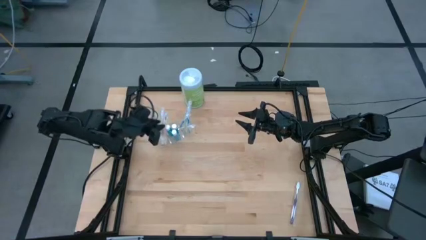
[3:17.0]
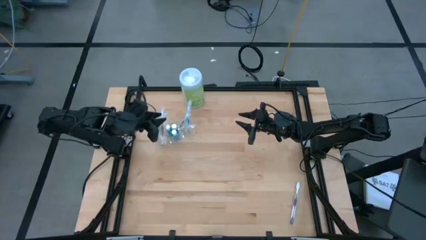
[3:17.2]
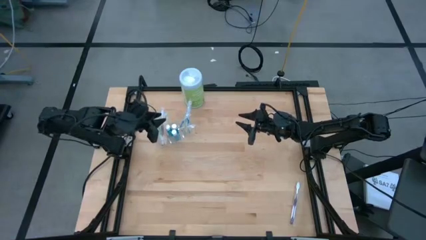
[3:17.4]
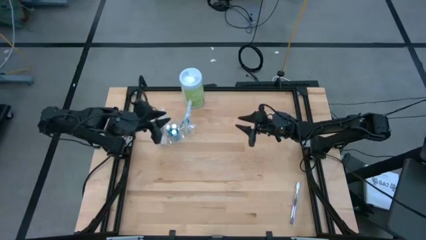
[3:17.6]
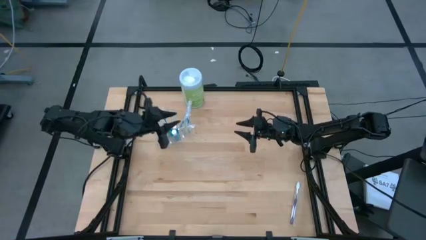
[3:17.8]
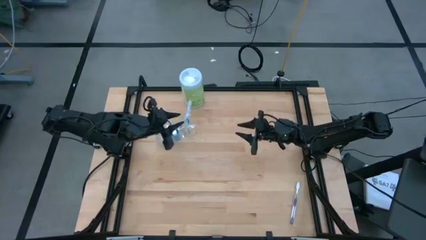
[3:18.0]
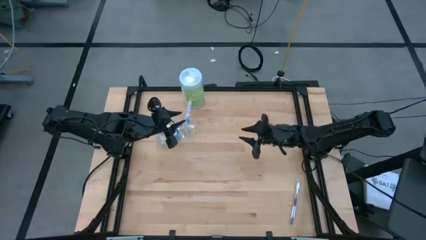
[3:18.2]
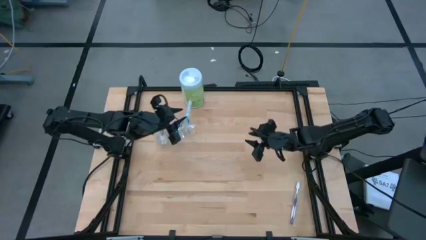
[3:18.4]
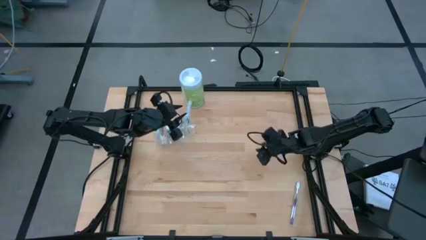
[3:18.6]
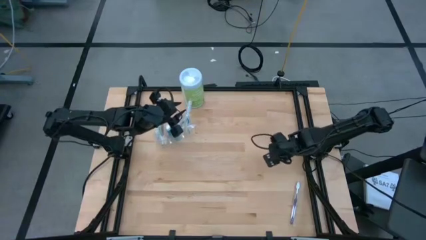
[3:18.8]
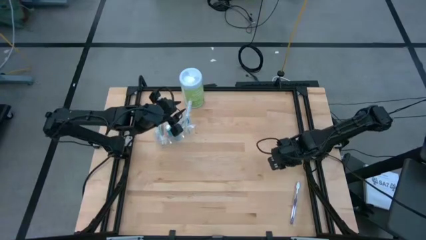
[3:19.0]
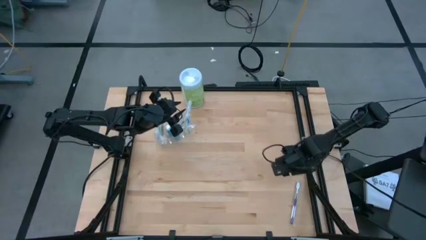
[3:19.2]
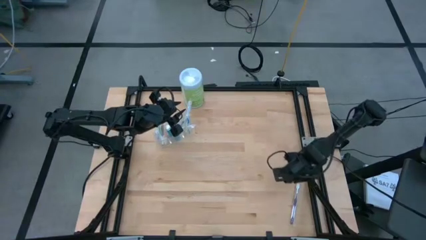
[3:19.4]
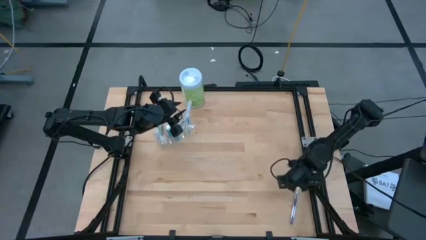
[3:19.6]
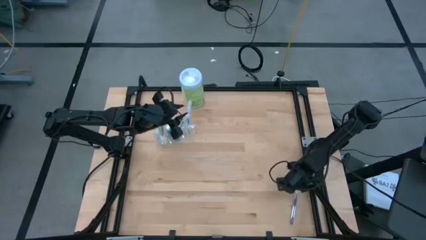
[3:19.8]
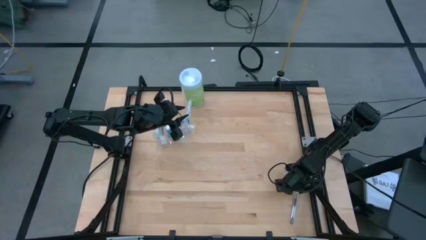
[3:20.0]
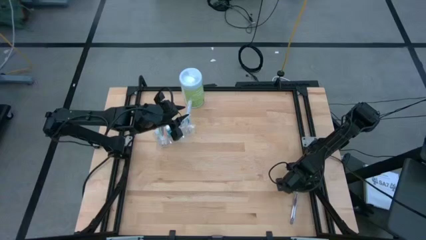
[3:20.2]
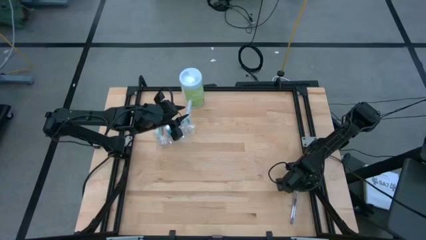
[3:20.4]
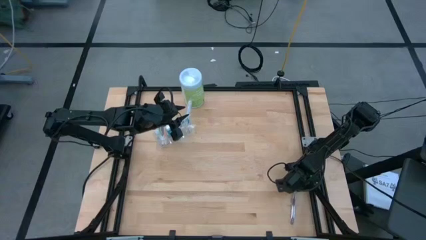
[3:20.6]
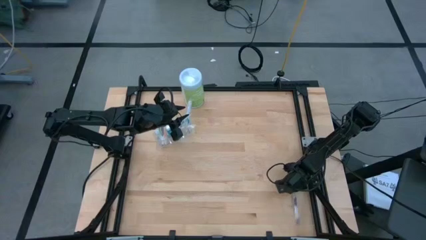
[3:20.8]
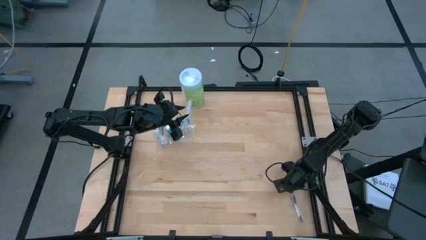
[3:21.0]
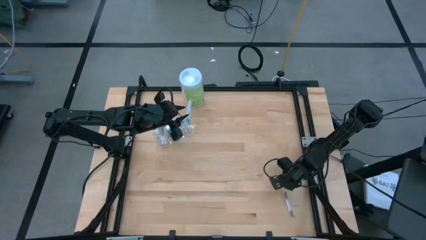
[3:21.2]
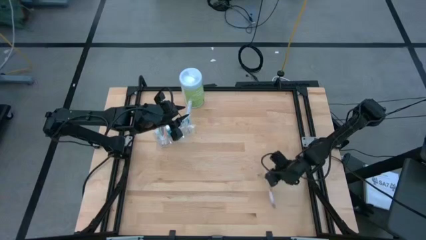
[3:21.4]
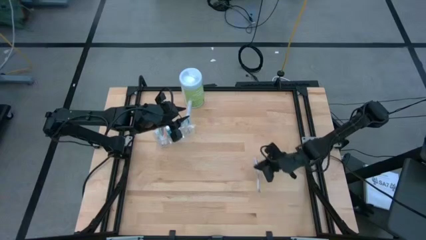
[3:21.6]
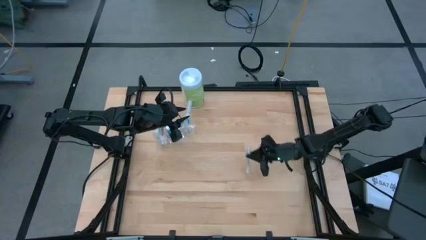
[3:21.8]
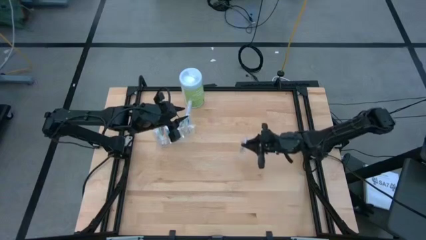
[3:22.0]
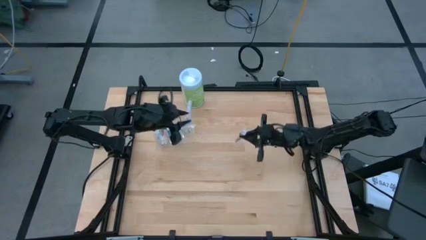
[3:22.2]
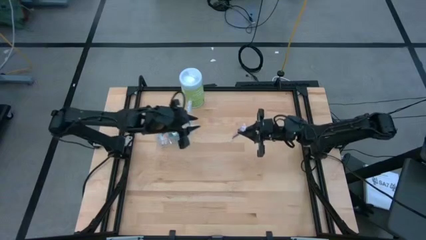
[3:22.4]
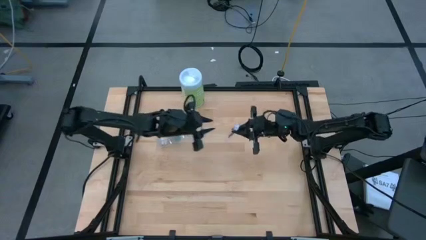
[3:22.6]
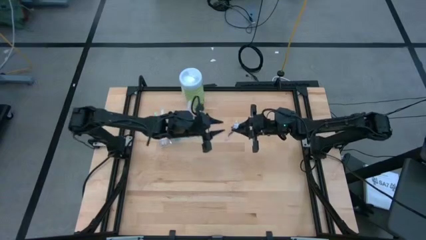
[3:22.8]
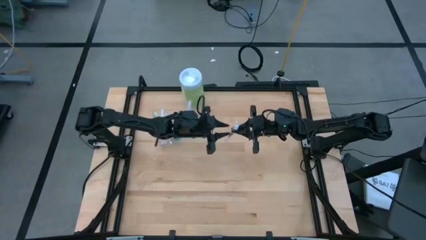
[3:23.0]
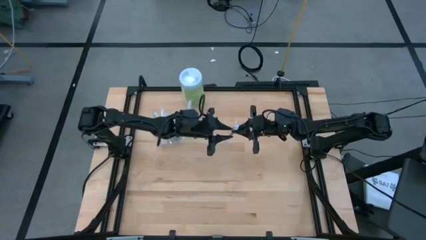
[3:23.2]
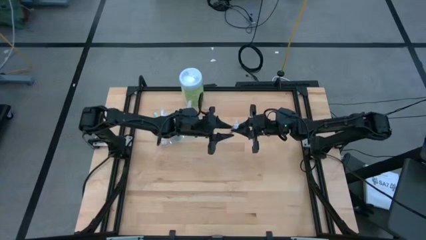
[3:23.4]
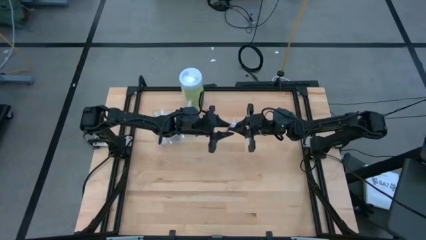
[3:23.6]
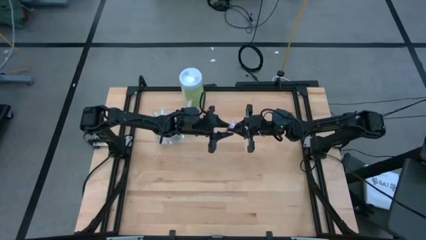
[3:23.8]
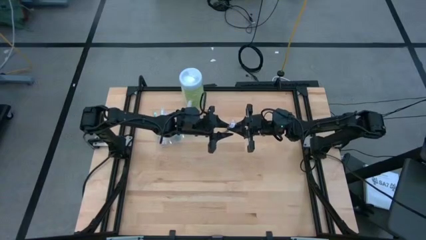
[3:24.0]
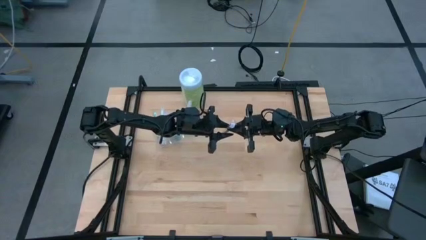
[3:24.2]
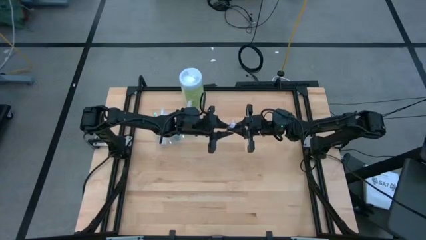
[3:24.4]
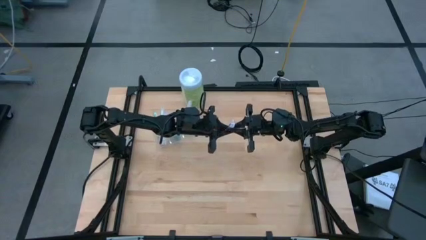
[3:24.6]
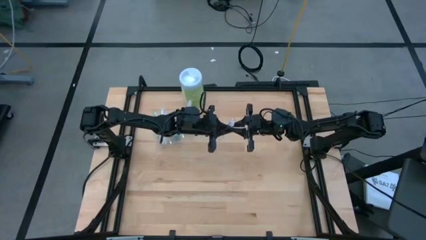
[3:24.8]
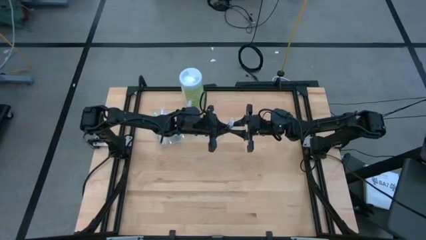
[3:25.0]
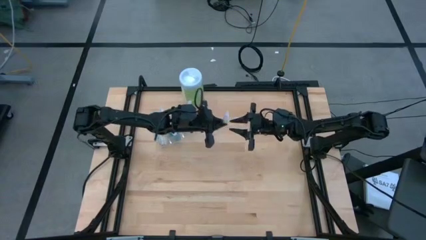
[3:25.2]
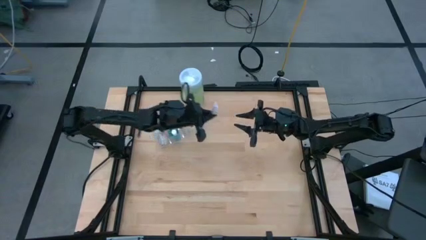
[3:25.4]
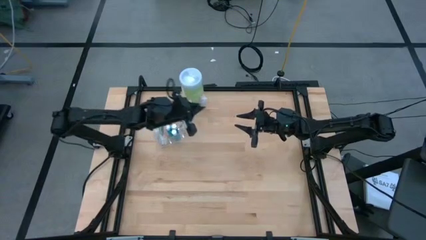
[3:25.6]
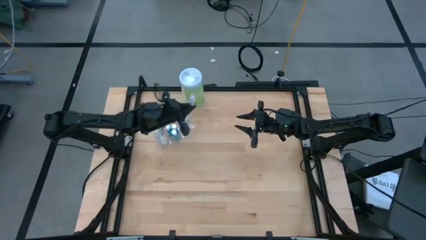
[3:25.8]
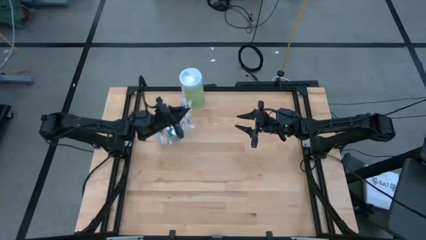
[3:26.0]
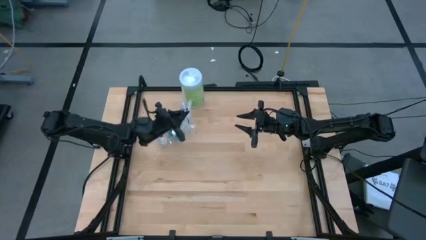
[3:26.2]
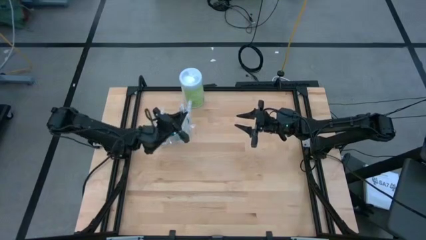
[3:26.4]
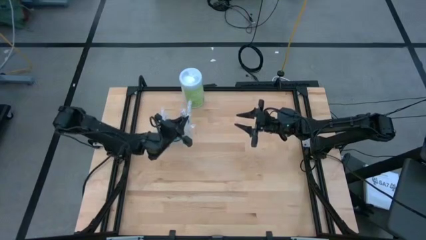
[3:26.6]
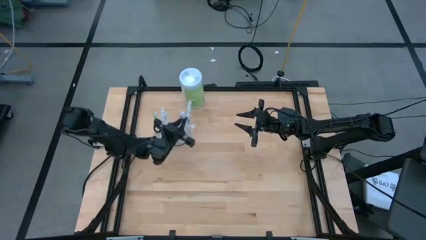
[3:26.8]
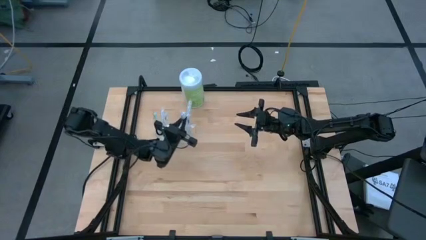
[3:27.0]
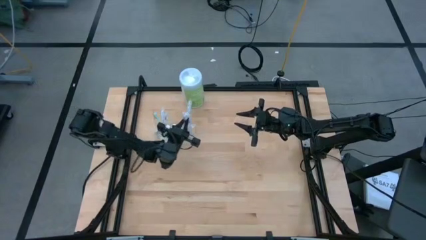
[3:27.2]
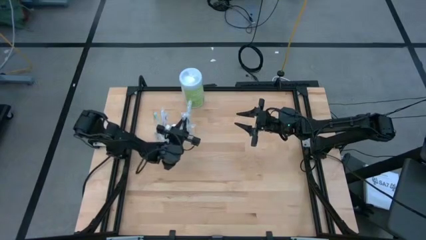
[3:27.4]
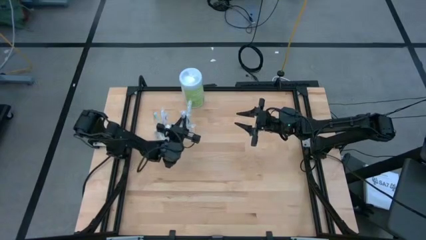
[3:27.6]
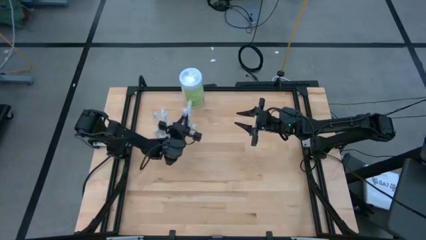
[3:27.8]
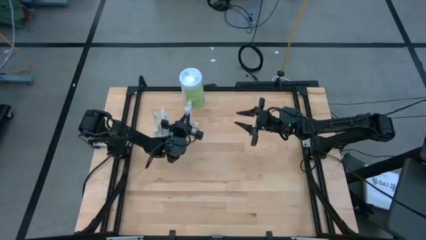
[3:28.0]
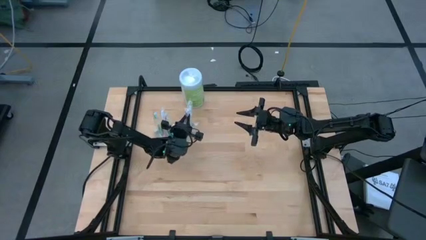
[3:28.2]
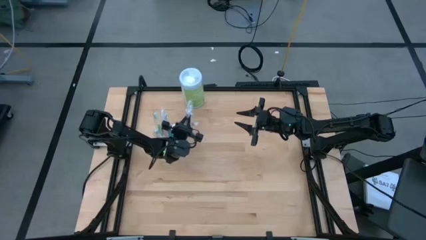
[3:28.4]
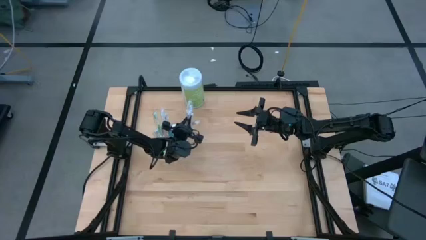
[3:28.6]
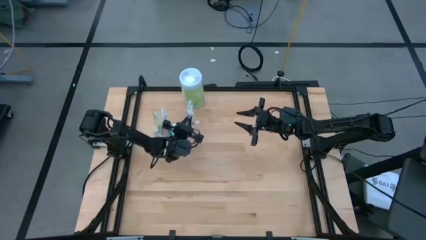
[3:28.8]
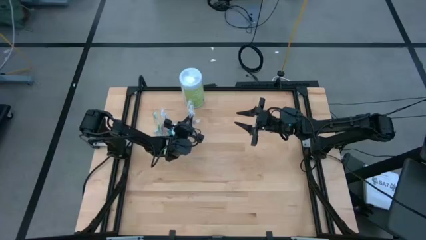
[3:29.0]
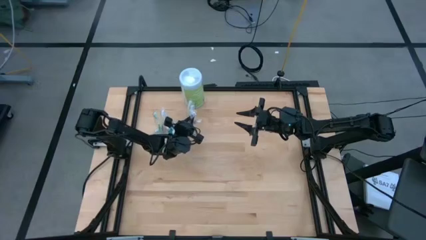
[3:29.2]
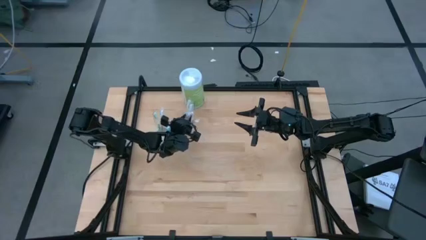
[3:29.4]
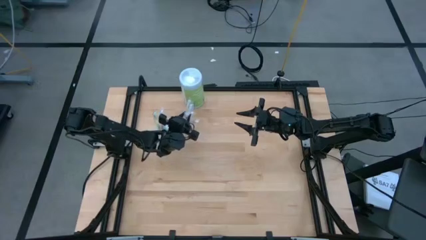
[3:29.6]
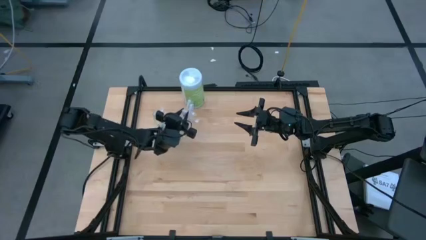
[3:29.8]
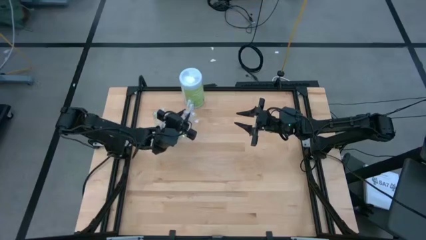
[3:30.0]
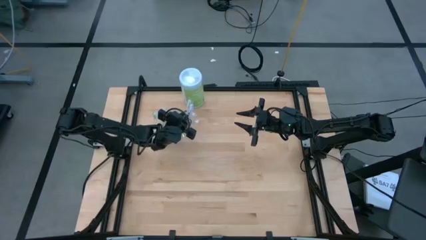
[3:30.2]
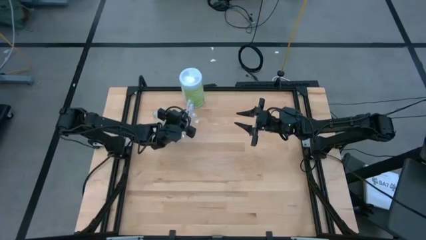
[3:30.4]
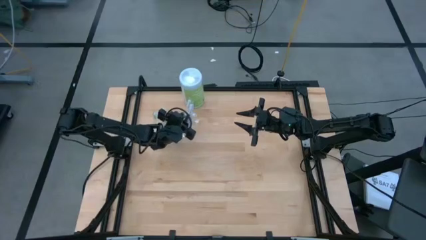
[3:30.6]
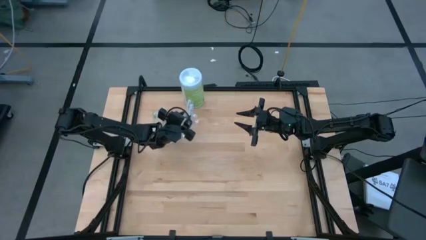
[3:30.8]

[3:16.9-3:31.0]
Task: Pick & Place toothbrushing station
Put the purple toothbrush into the transparent organizer

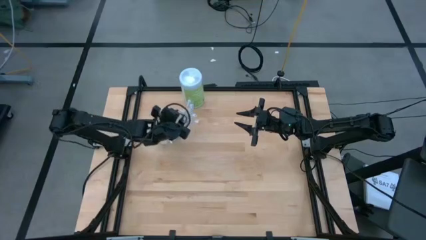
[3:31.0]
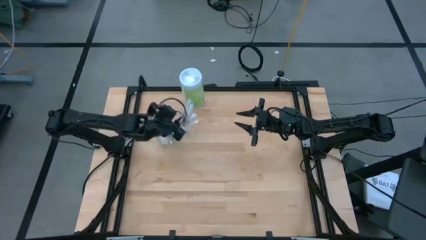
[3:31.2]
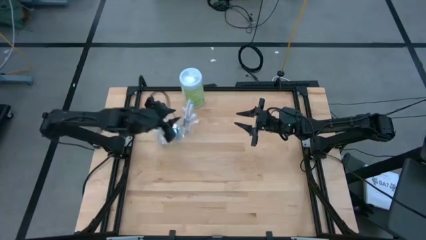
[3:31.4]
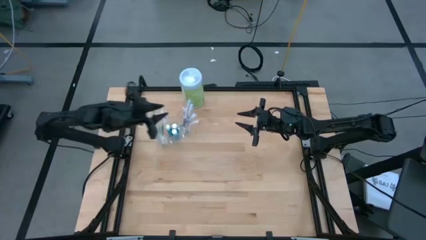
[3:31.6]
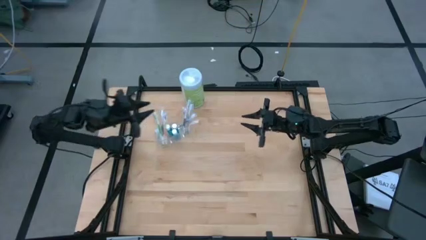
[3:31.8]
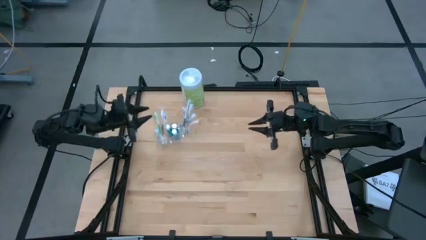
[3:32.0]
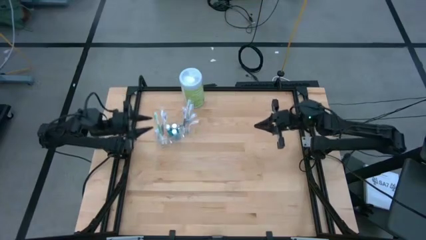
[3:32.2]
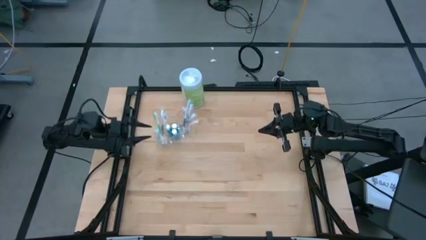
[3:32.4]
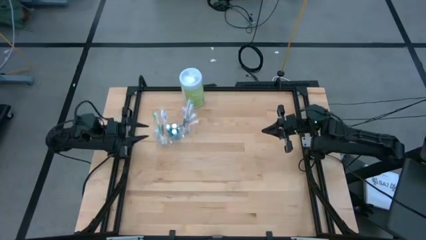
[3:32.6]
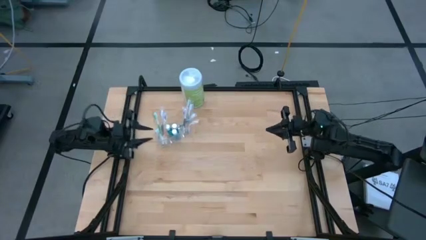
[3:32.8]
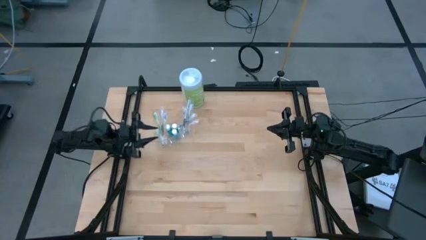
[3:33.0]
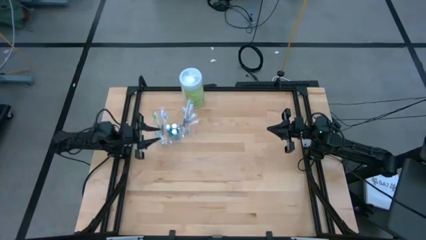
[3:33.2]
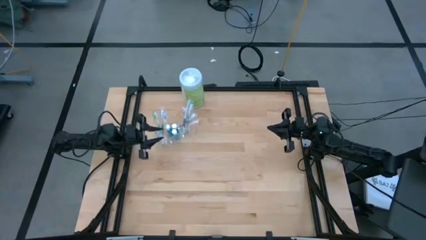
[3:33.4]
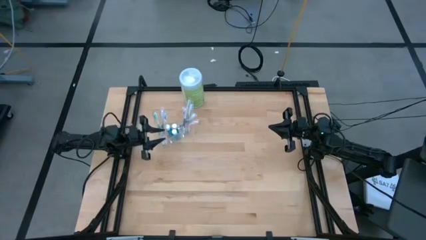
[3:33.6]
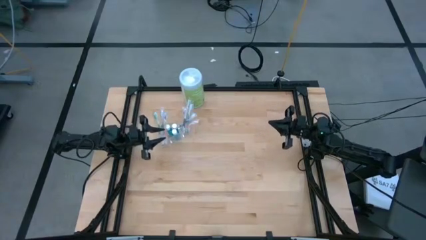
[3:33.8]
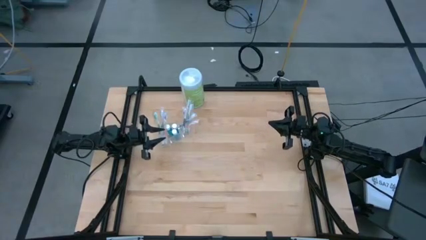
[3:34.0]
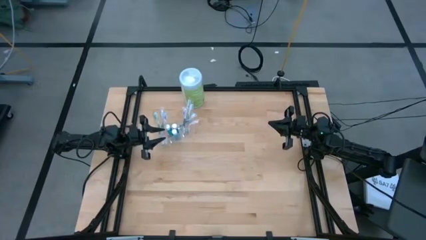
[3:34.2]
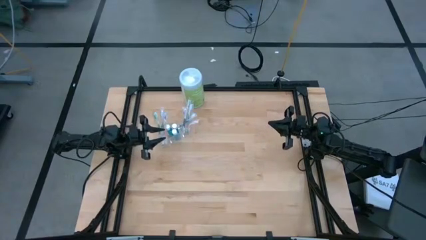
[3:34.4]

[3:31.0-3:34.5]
Return to Home Position
